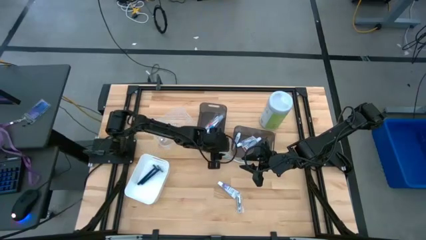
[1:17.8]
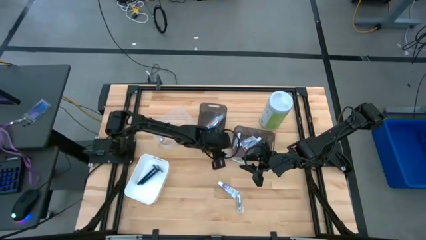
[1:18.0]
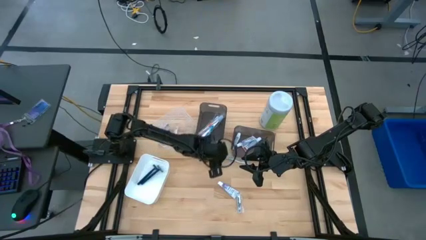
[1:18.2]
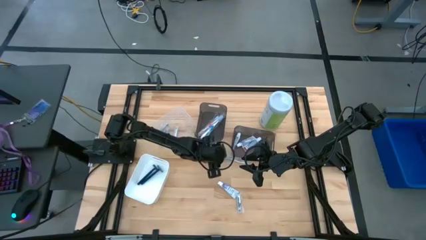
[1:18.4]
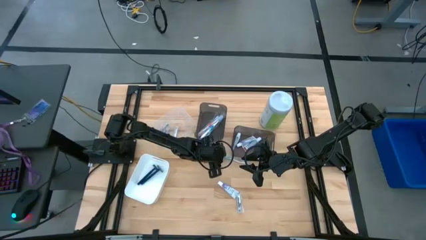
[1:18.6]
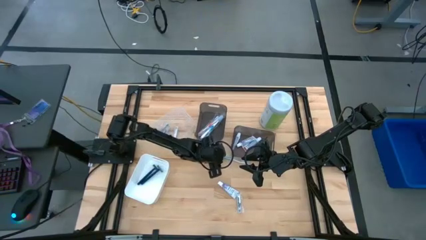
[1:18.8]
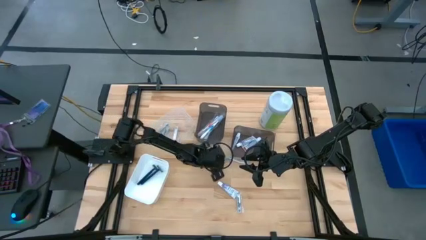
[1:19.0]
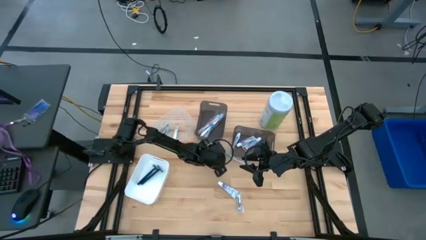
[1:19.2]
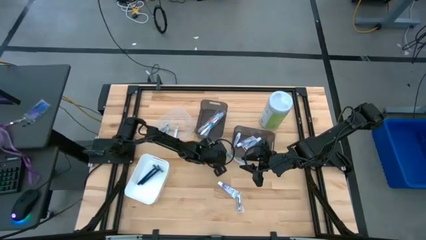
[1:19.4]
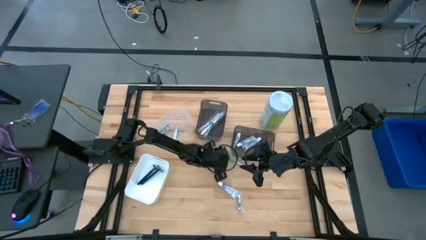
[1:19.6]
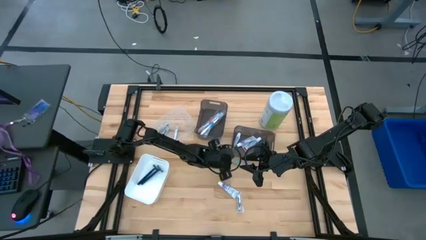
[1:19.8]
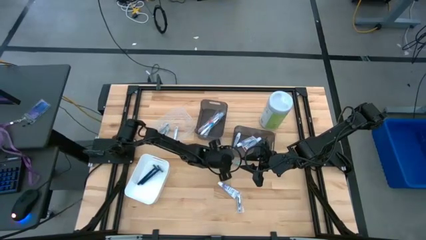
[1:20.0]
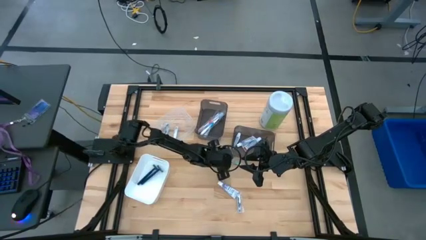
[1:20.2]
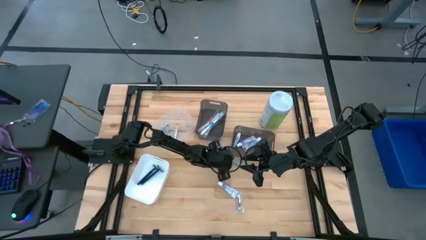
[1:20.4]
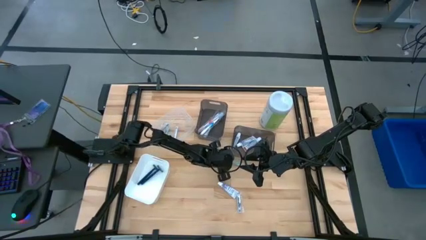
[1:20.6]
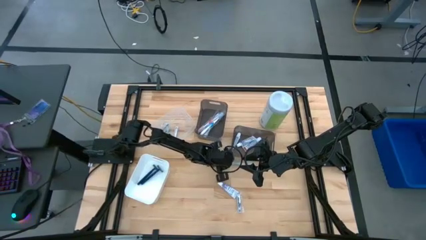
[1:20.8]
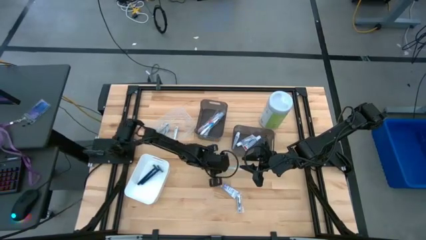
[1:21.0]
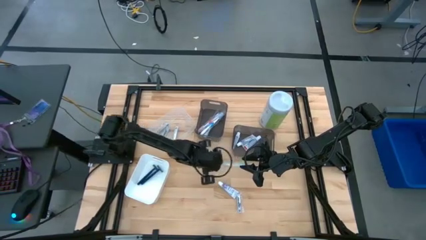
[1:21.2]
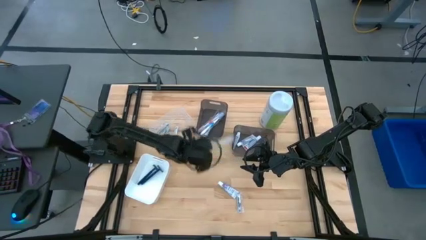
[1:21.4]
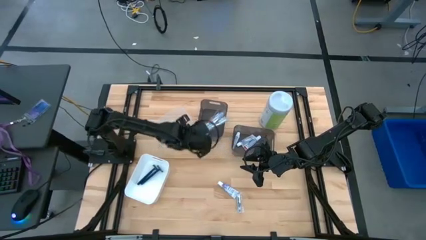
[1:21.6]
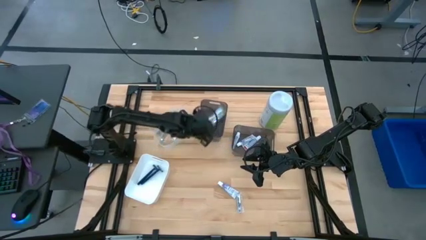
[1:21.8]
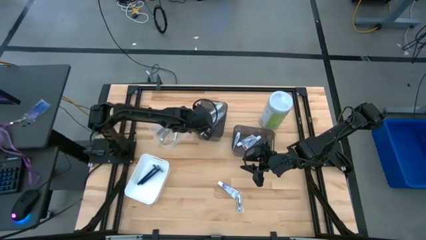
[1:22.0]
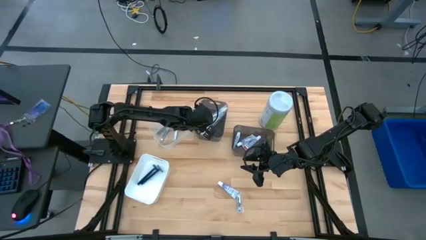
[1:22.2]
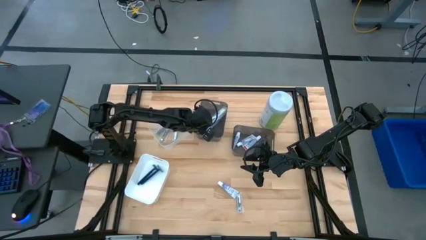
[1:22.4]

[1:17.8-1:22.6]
Task: Pick & Place Travel size toiletries
Put the green toothbrush into the left black bin

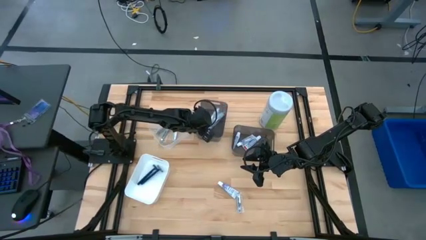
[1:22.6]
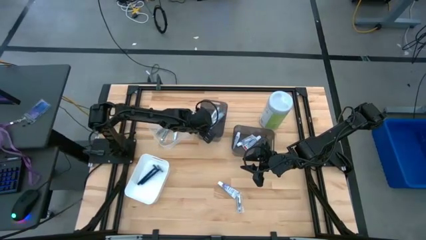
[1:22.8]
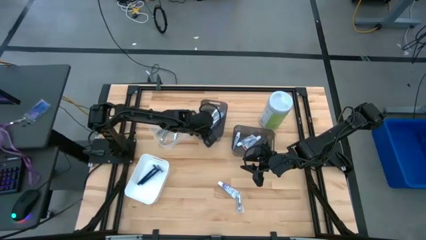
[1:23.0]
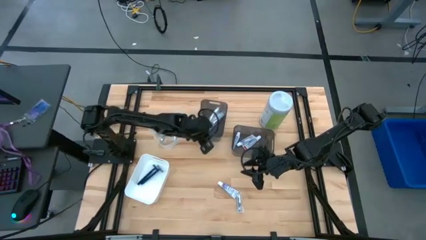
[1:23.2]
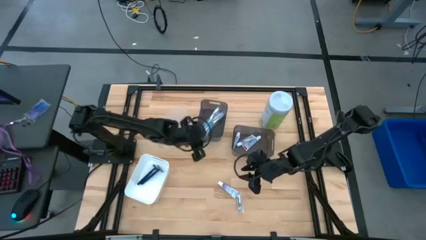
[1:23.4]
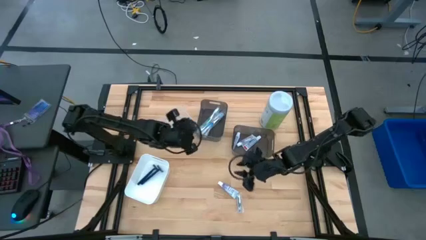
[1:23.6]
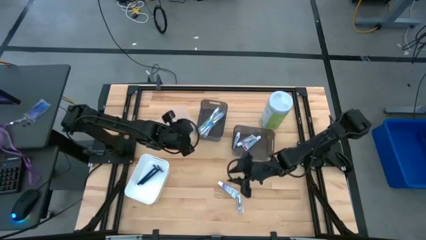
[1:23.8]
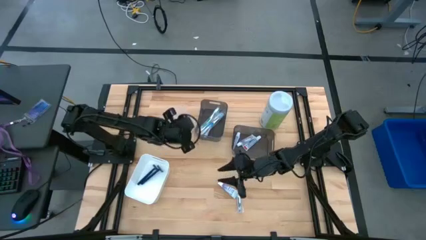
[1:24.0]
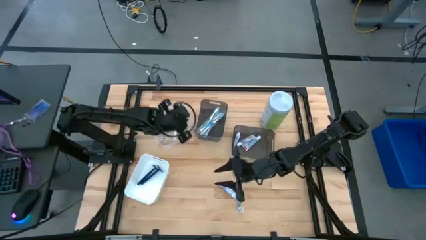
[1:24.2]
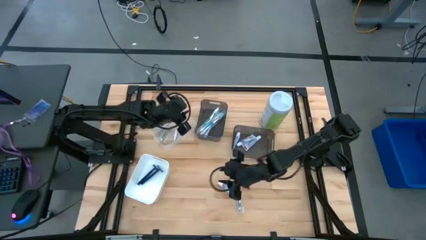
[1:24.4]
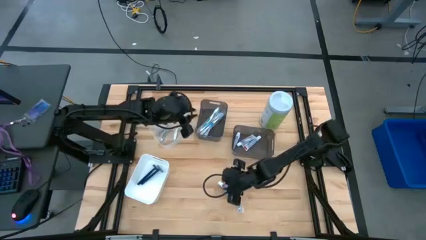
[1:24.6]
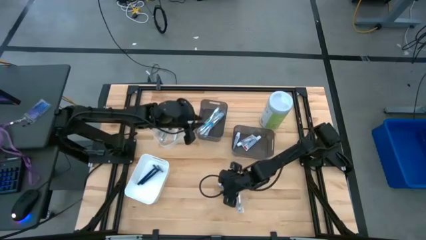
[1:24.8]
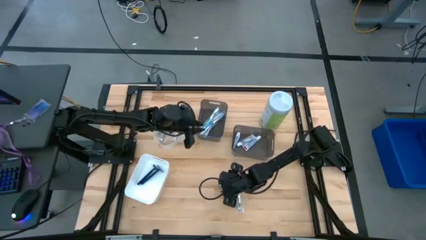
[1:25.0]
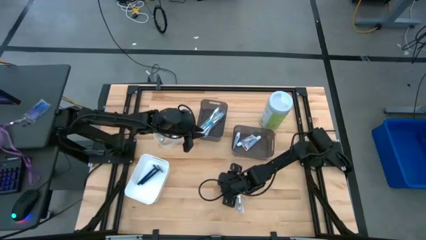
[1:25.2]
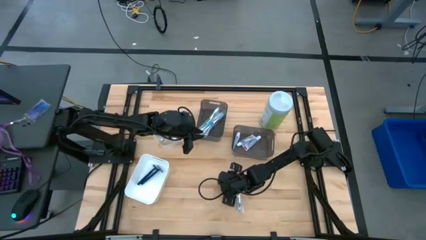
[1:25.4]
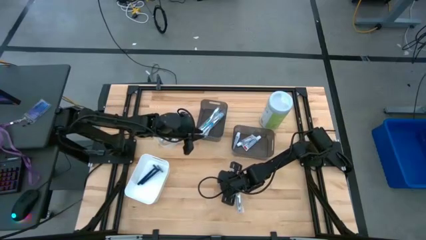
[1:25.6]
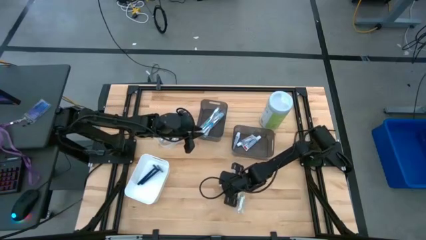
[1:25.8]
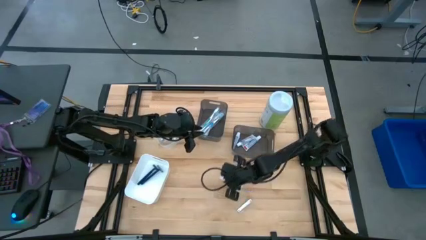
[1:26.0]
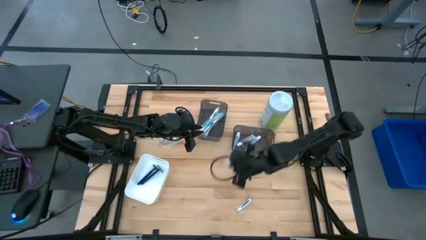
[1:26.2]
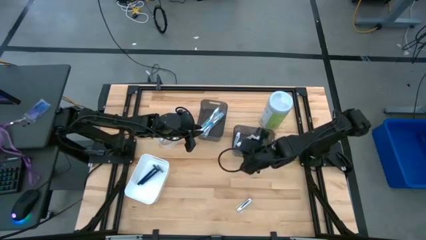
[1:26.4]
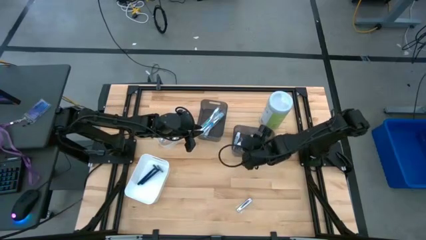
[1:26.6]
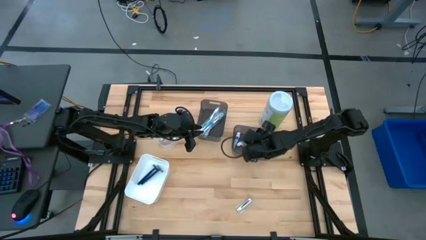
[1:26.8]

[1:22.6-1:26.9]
Put the white toothpaste into the right black bin

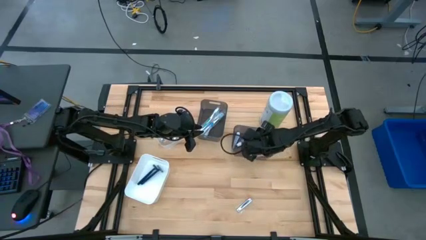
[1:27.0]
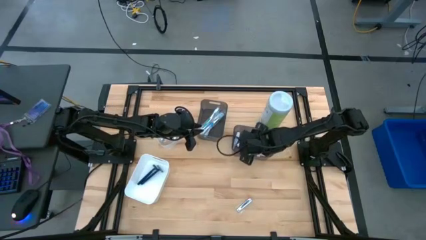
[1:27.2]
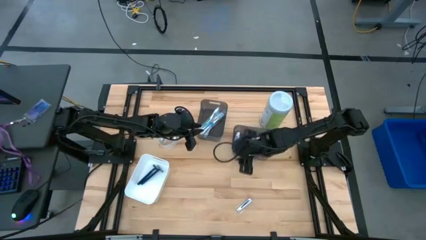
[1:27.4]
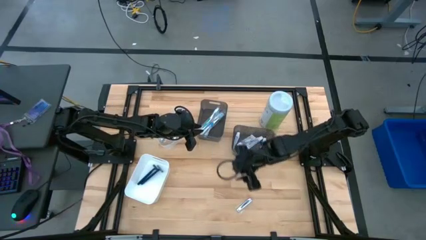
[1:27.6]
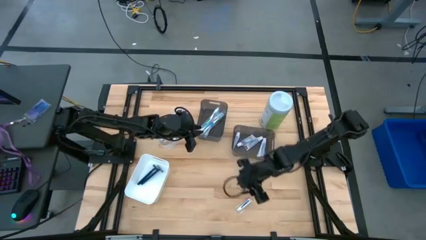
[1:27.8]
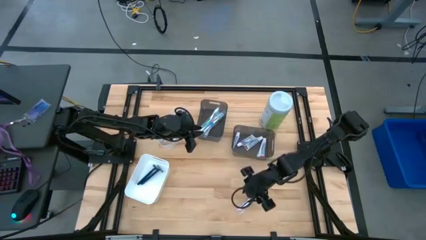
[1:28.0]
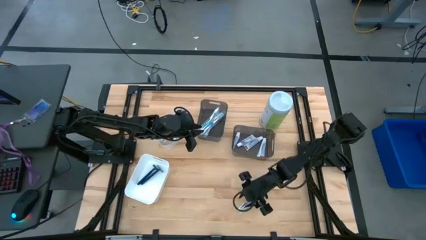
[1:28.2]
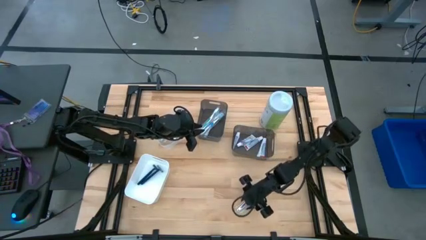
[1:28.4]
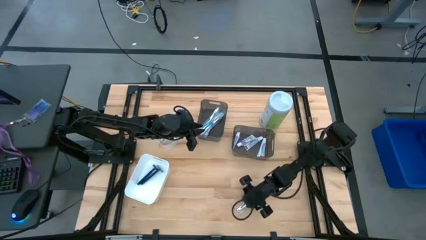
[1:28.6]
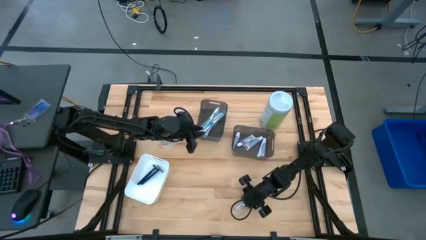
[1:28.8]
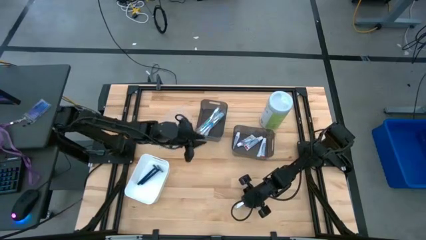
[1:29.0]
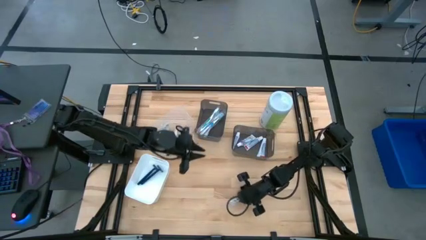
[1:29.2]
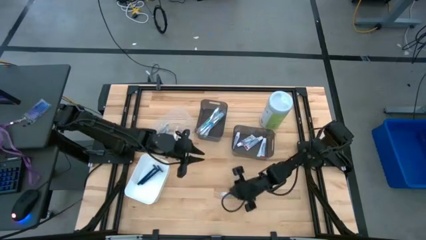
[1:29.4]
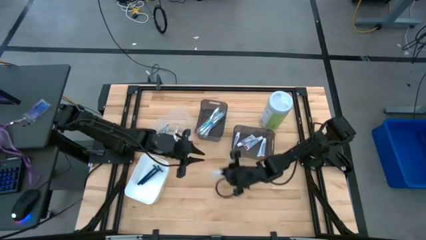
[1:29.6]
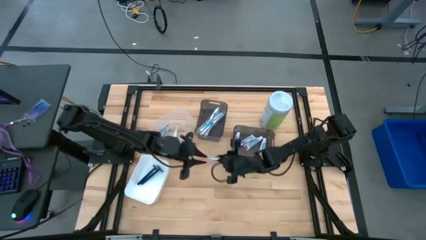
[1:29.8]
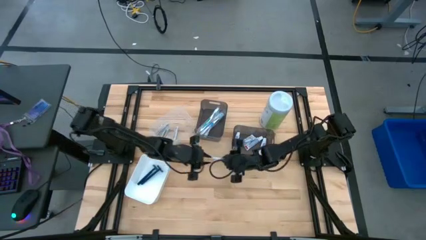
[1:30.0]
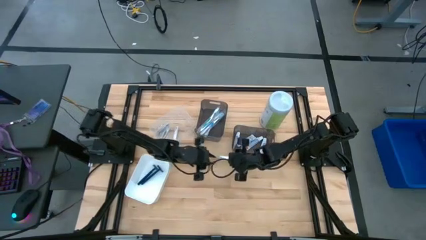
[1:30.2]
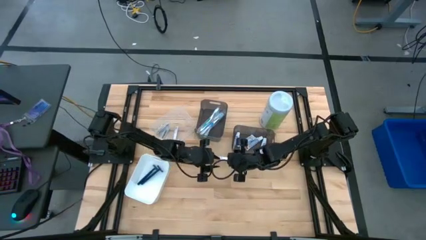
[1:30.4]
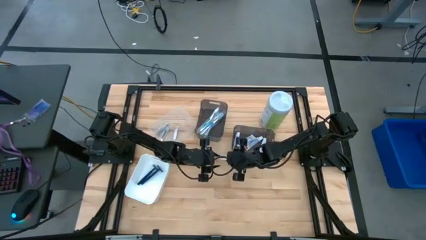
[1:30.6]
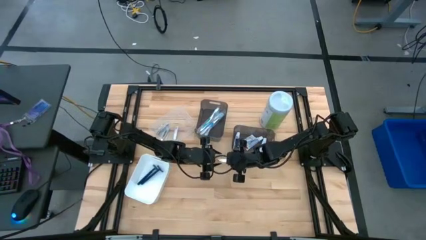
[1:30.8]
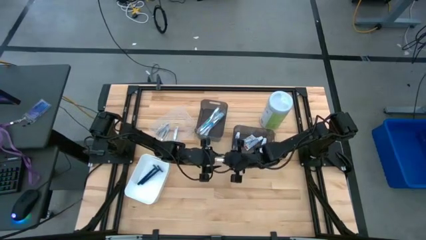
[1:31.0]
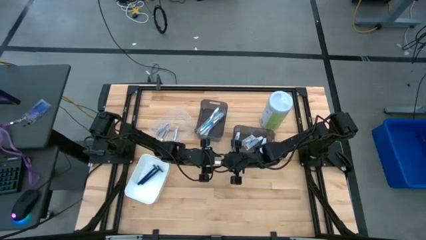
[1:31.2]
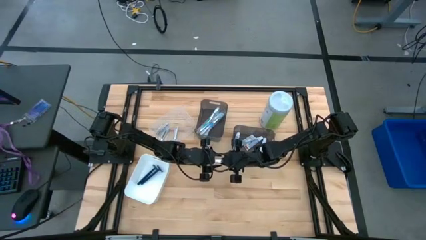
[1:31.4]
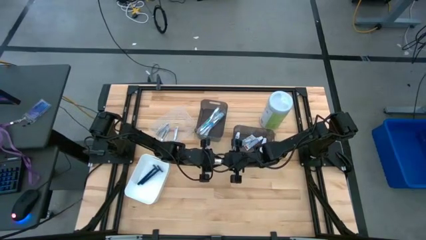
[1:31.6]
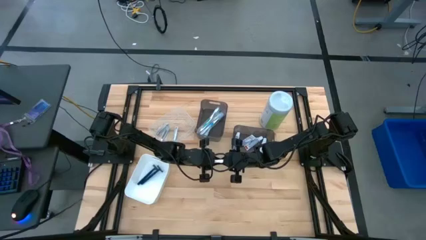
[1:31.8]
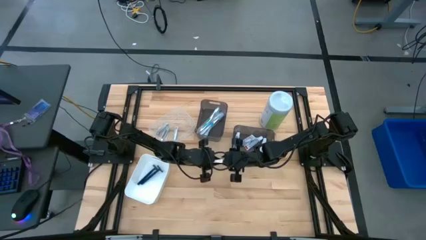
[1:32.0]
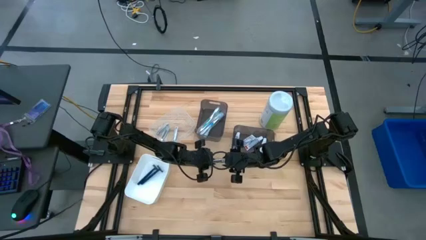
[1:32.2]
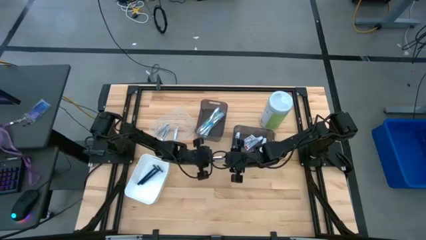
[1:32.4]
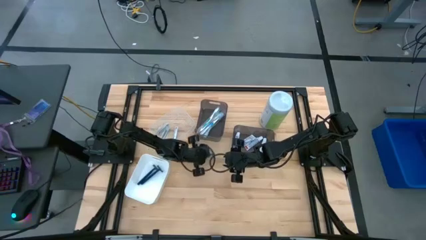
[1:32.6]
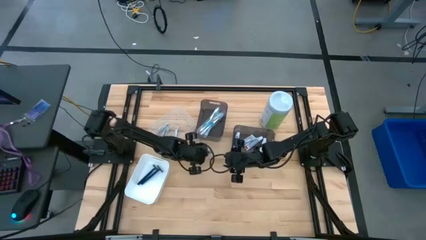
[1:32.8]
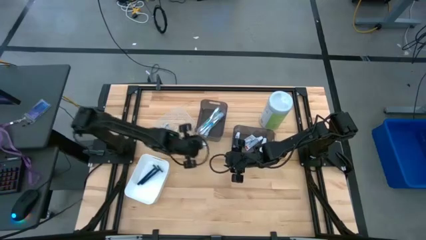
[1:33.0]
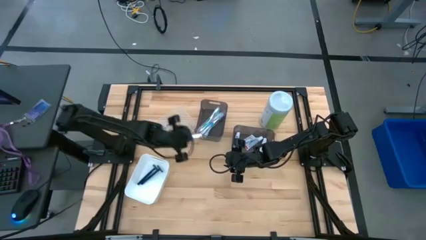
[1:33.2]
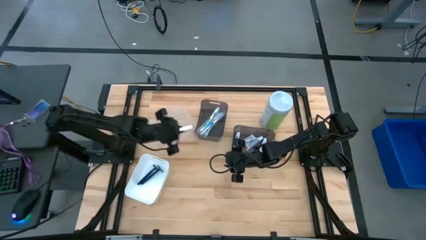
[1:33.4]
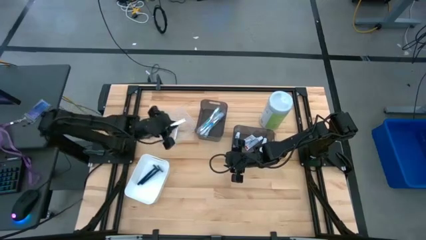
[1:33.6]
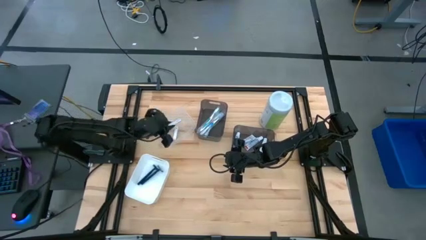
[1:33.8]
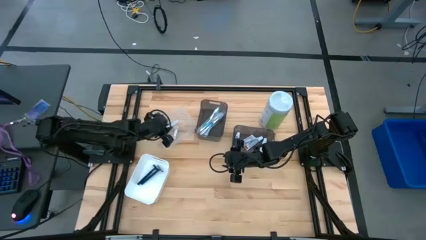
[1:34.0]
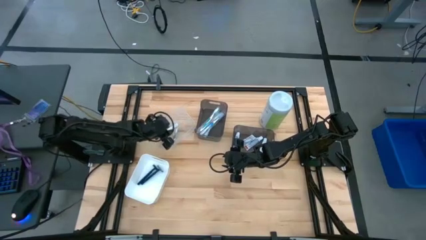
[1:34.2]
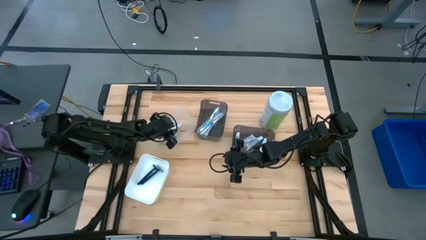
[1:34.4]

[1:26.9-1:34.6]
Put the silver nail cutter into the transparent bin
